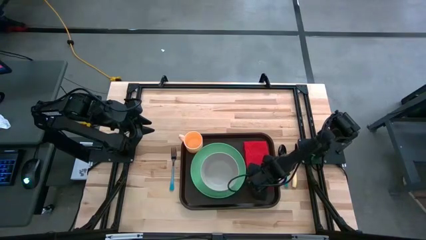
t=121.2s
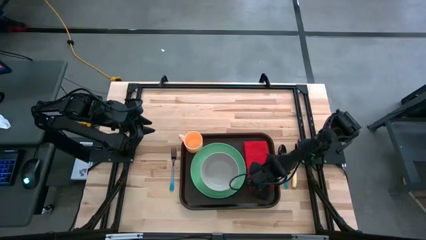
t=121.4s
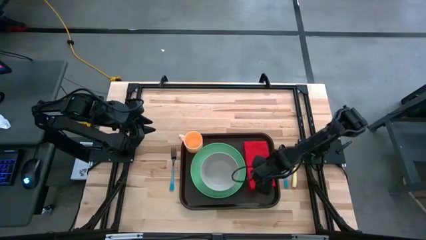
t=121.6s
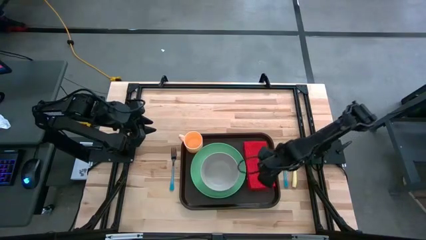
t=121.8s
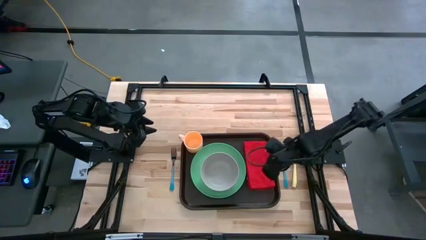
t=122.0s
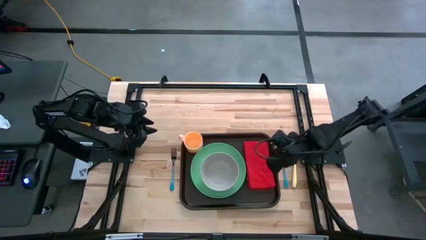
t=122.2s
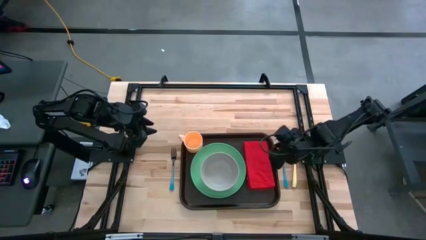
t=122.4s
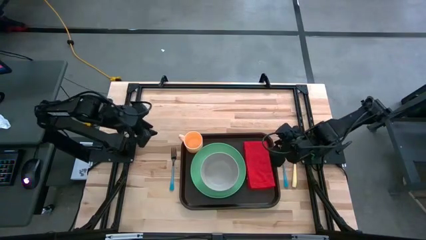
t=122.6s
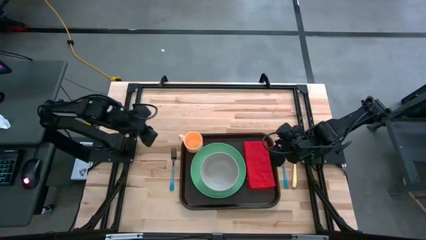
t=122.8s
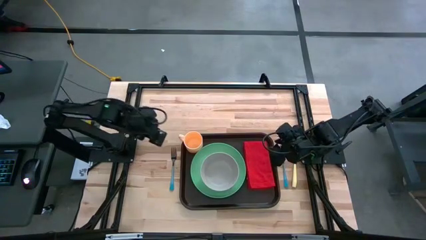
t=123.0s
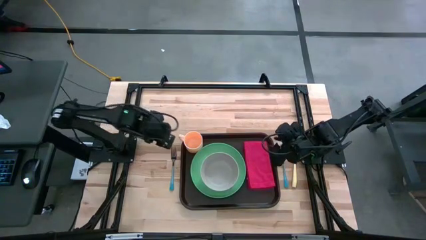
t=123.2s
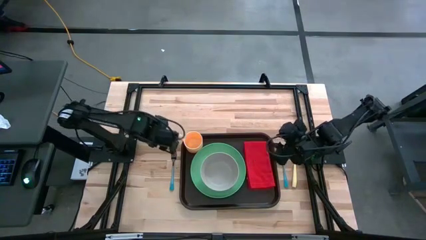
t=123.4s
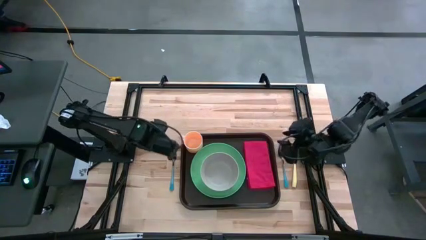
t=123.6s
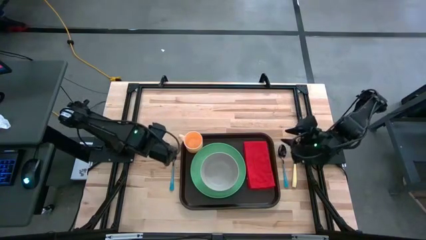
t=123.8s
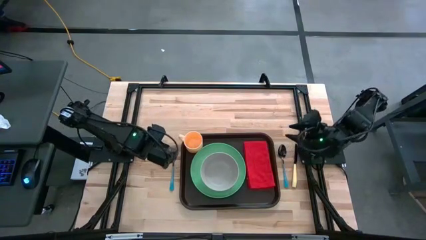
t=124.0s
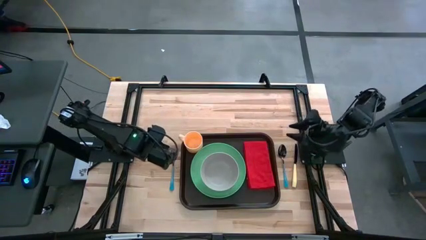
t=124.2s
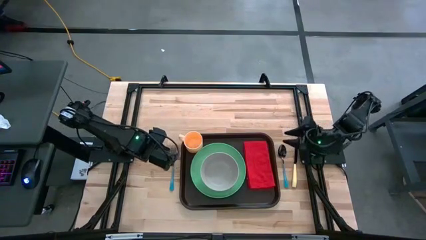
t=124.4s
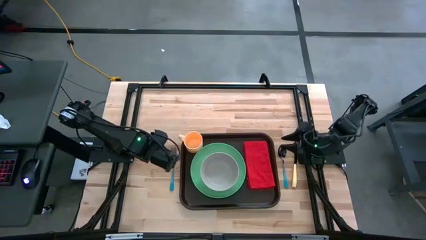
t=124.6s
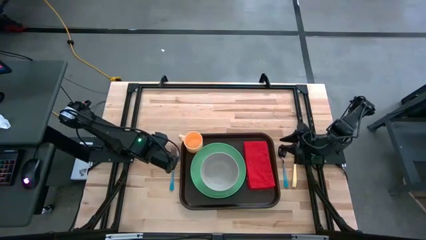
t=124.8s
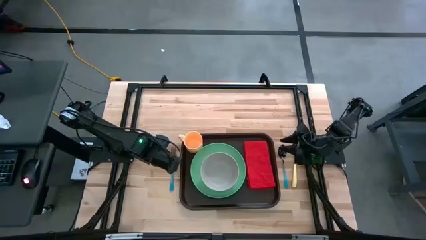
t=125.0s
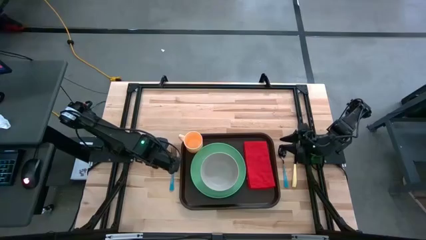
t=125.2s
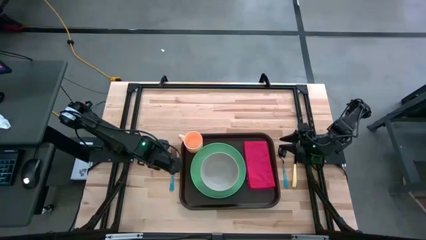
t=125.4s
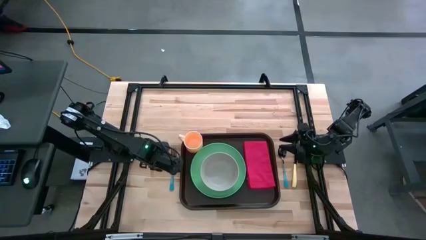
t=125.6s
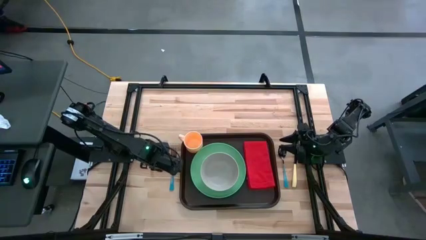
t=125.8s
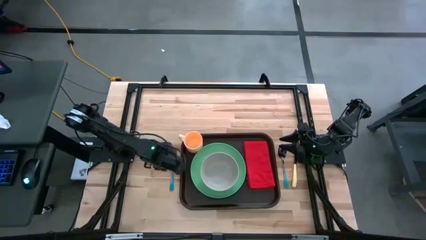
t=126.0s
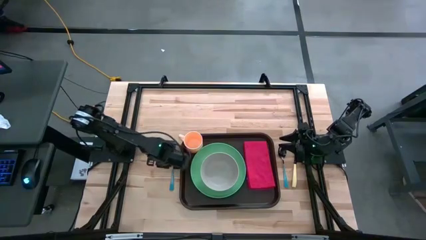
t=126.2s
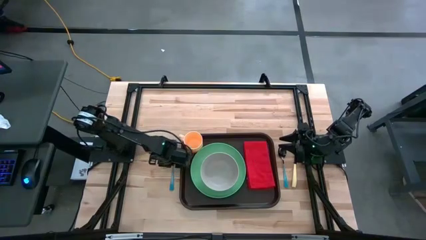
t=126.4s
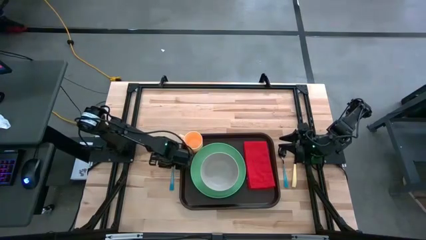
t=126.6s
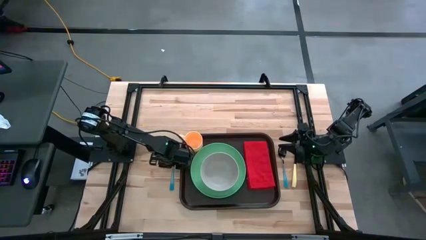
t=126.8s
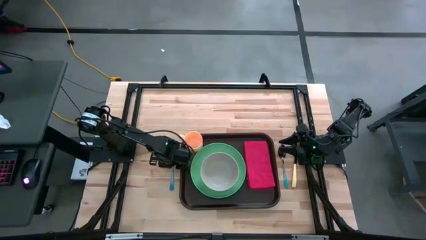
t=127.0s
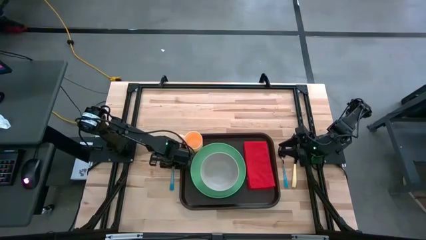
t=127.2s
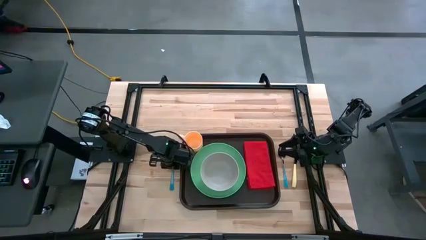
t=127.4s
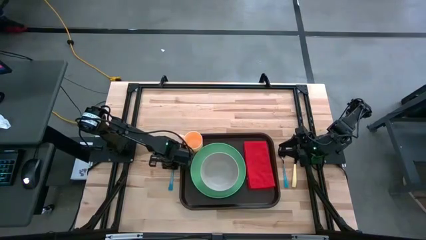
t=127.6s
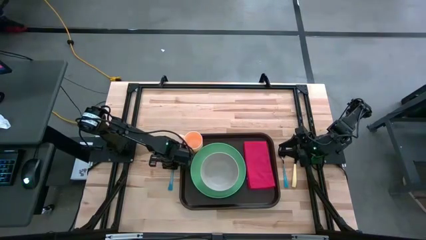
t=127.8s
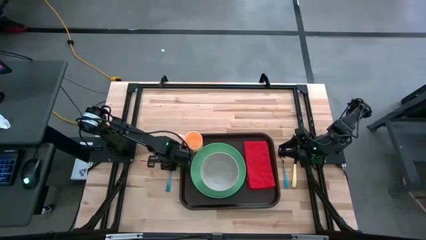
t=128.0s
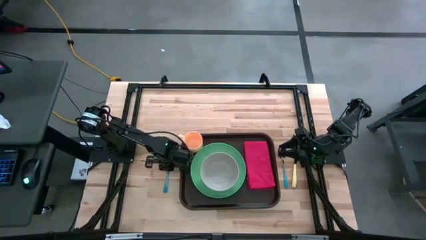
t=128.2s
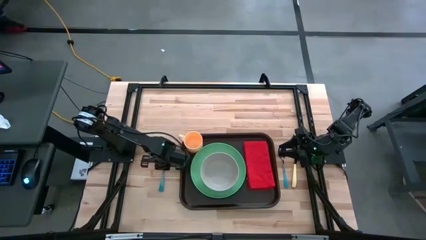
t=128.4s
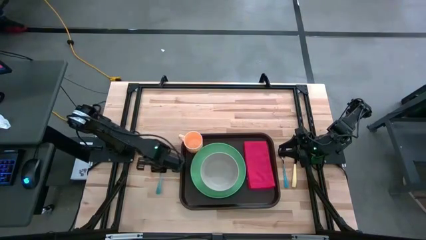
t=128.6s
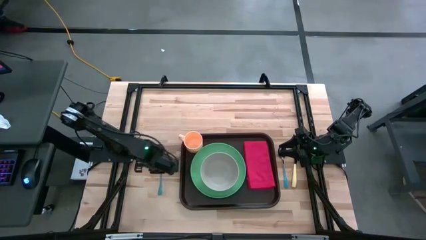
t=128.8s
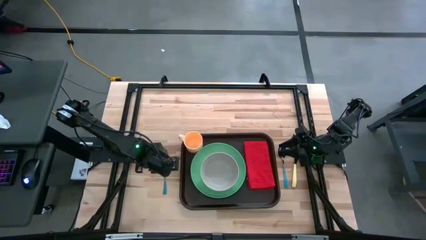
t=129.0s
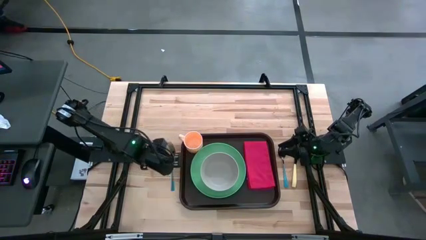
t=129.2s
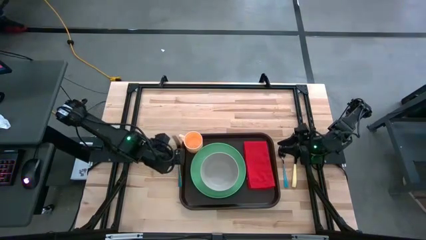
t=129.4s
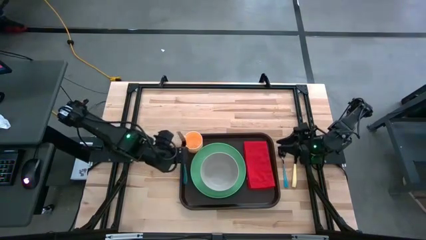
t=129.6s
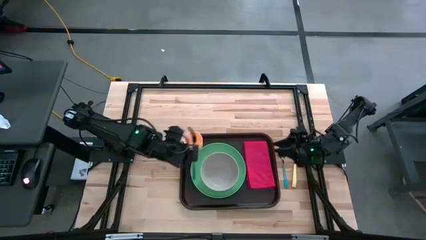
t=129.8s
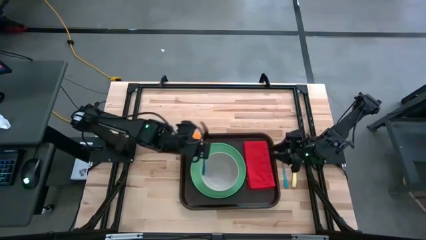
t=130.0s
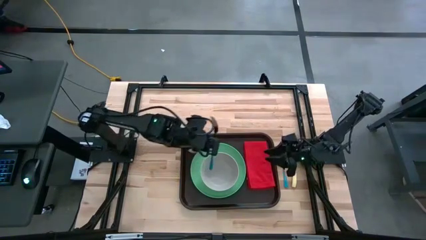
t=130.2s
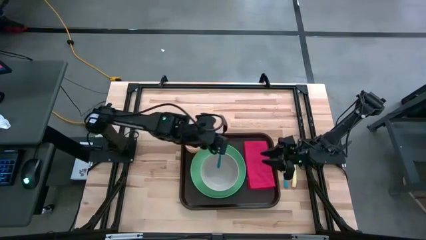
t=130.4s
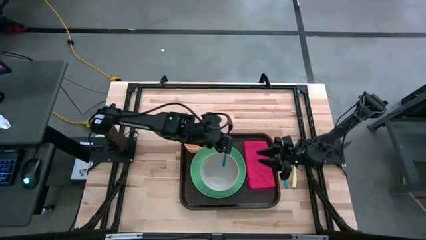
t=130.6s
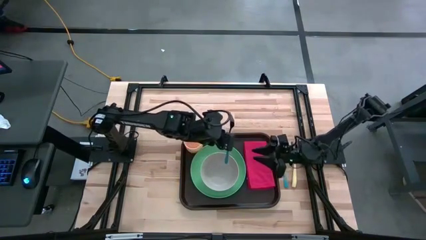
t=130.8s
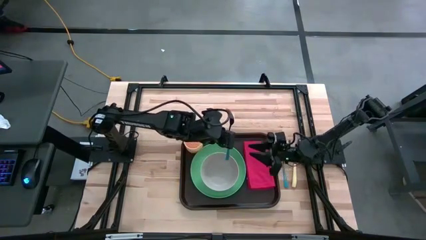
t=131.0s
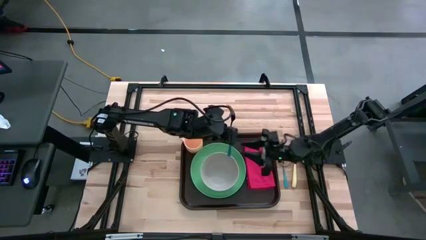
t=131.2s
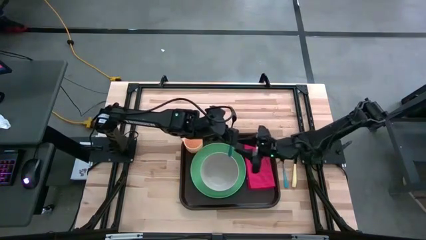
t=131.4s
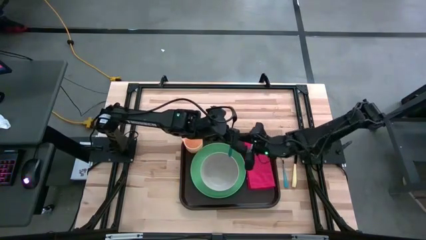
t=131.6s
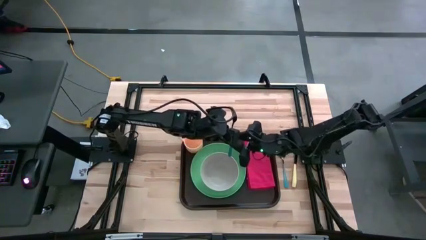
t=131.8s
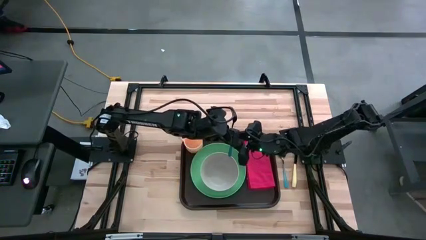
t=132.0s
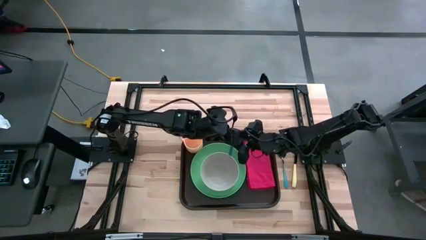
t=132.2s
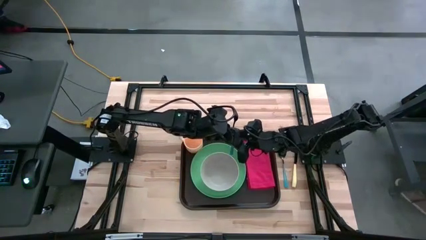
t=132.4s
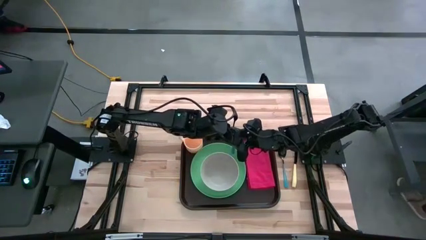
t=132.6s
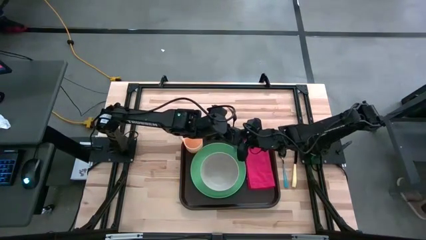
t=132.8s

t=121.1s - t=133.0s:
Task: Set up tray
Put the fork on top of the table napkin on the serving tray

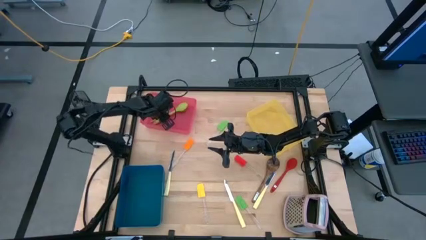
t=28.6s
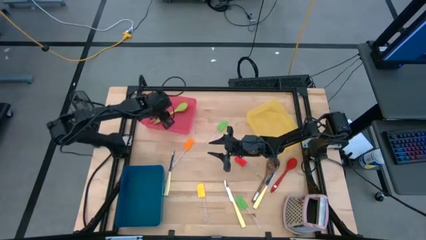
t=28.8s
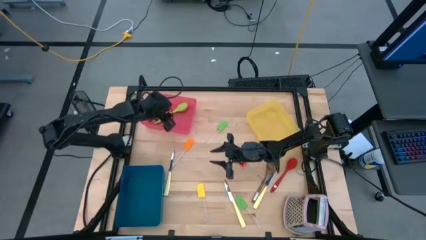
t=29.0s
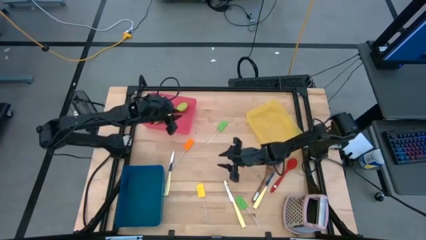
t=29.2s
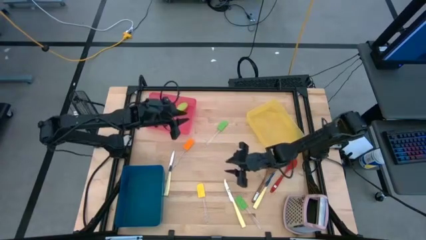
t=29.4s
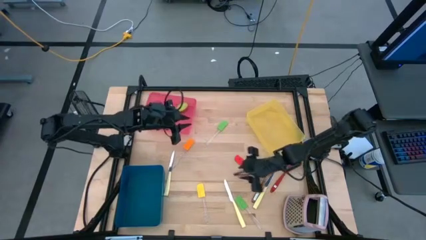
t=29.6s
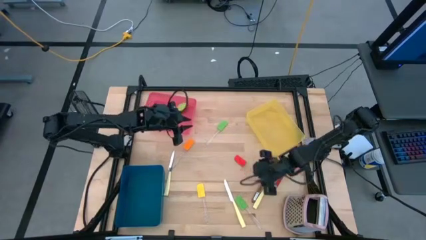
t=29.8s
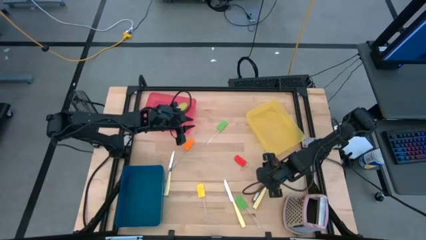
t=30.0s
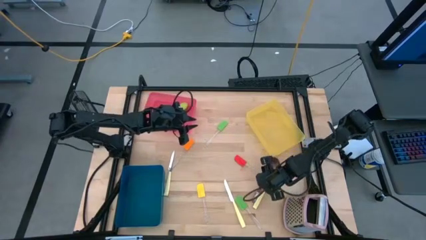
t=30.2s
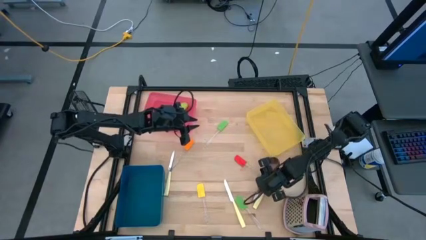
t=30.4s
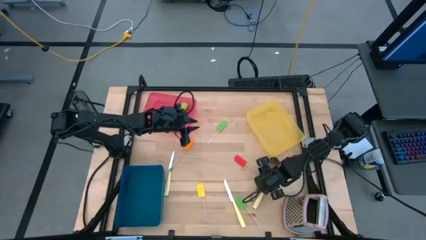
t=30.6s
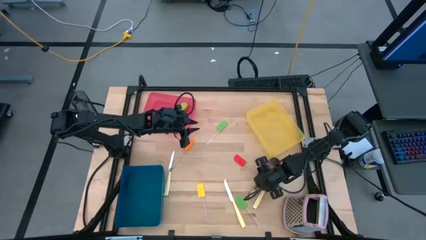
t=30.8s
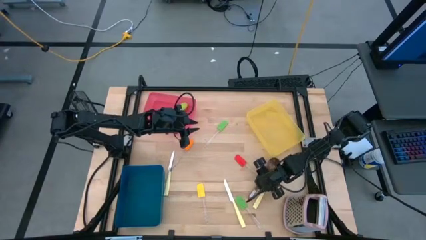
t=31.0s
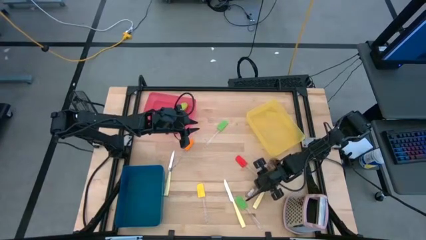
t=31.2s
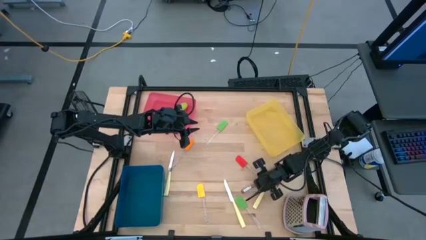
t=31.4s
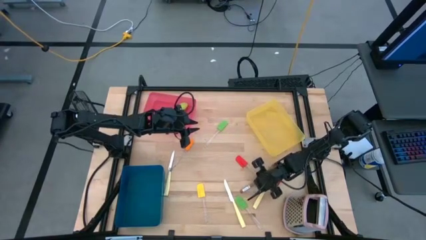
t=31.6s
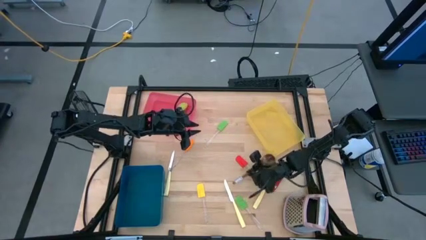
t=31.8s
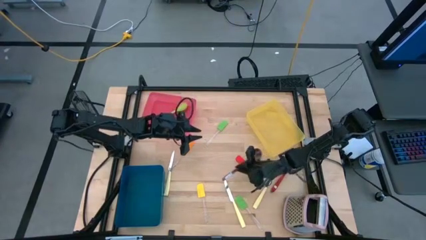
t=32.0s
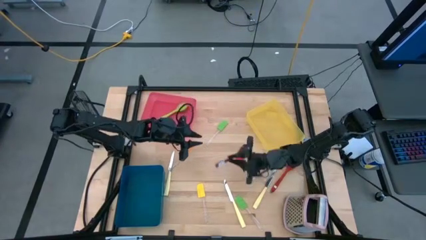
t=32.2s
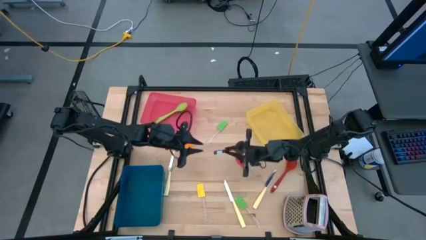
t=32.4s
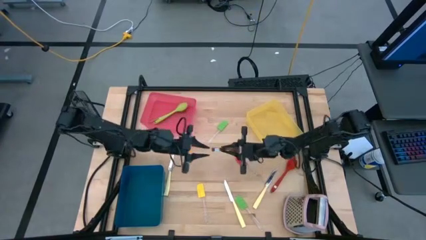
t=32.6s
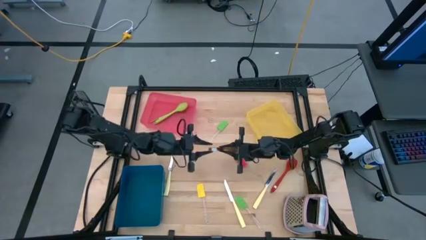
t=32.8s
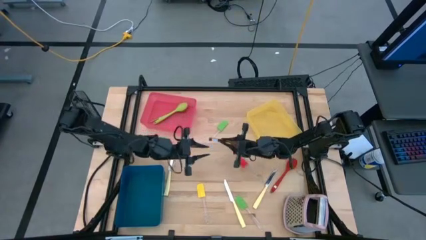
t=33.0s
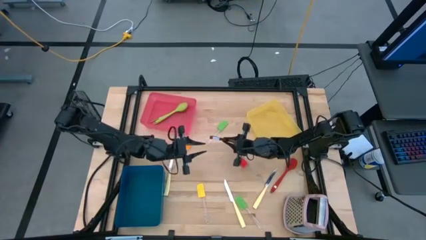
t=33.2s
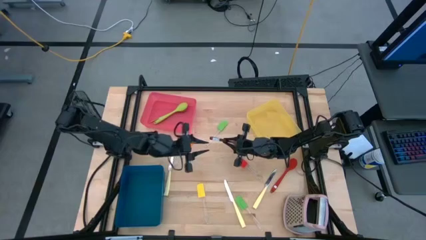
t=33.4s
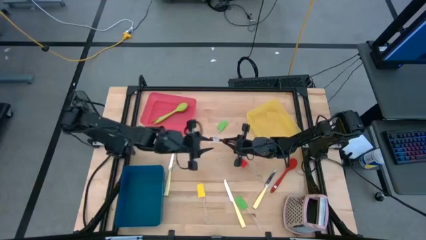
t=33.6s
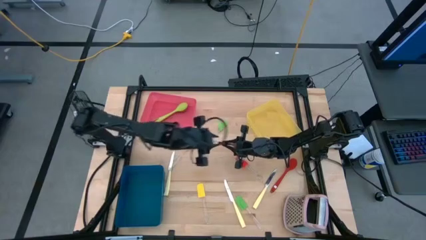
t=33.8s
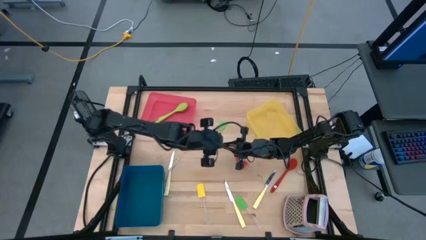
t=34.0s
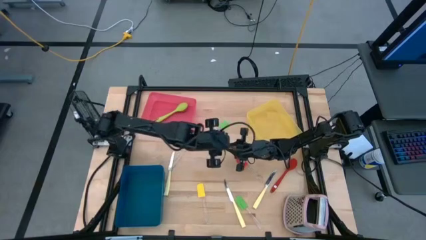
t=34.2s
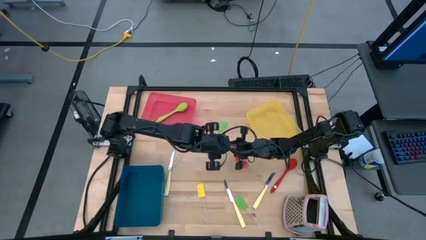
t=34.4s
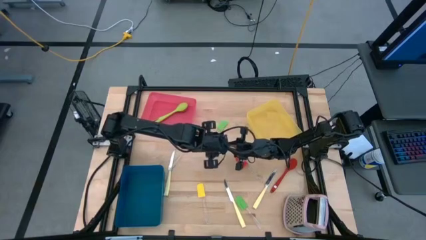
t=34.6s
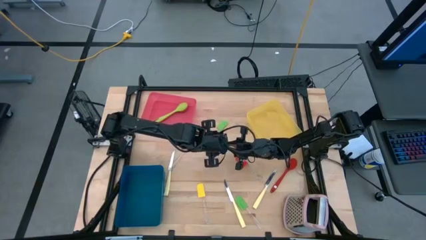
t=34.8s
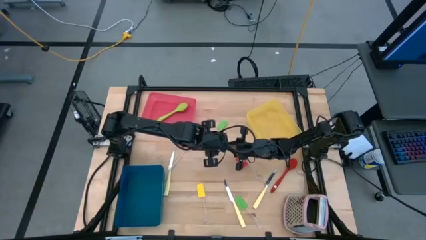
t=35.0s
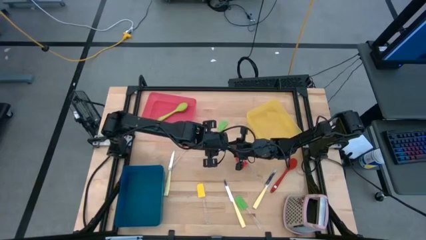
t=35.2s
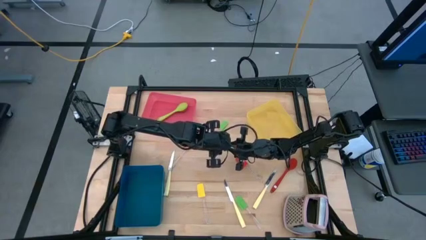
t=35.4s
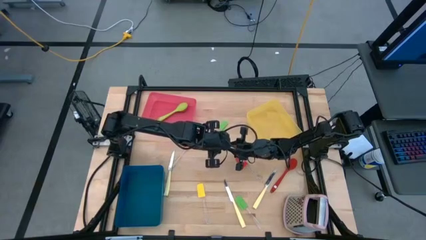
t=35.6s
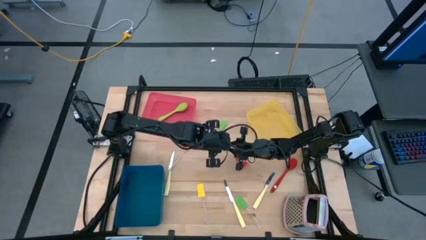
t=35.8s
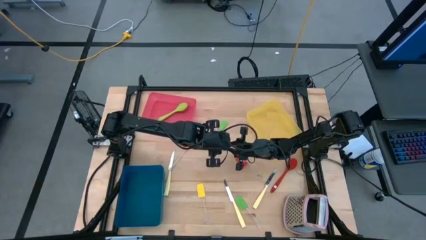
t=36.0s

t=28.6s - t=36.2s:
Task: Pick & Place Kitchen Items
Put the brown serving spoon into the red bin
